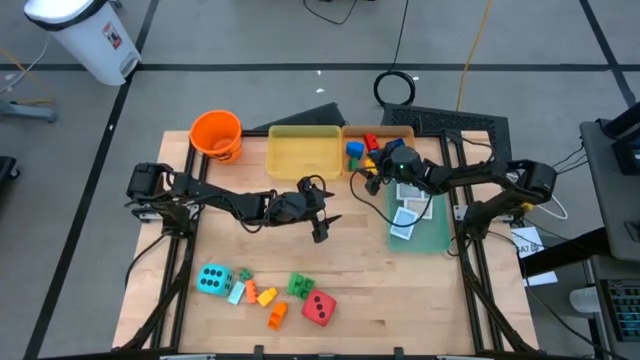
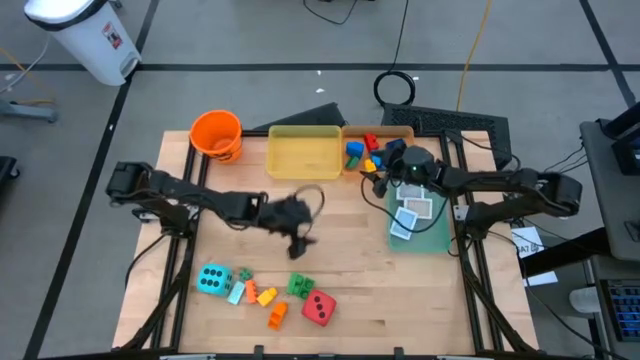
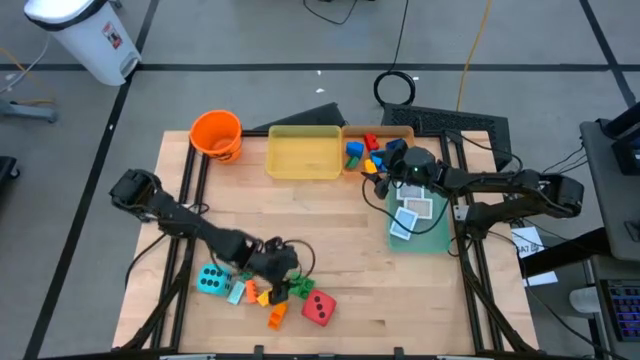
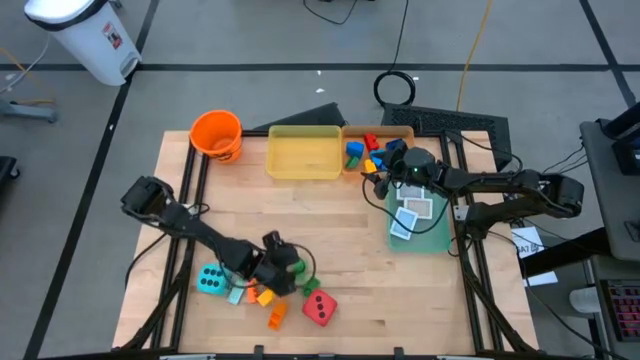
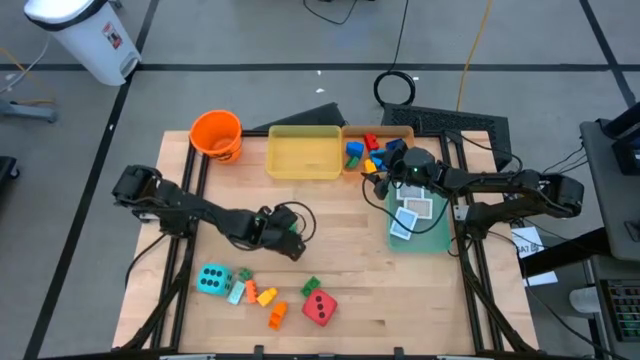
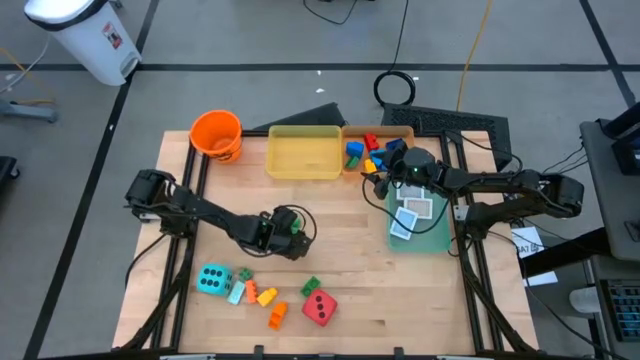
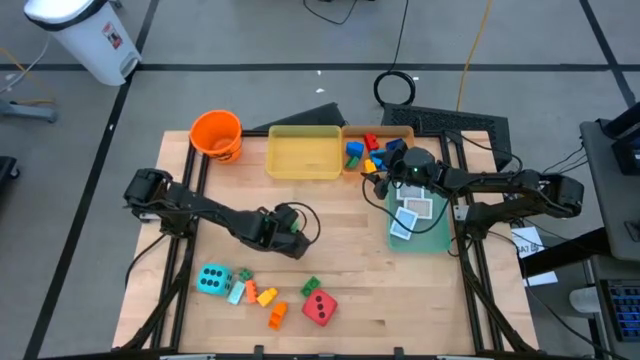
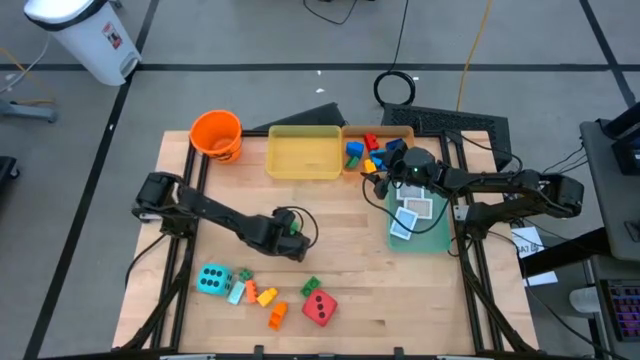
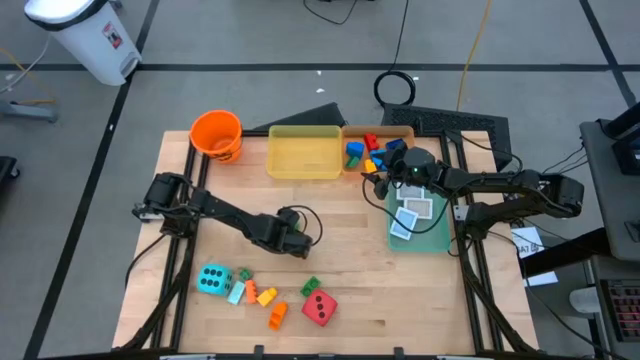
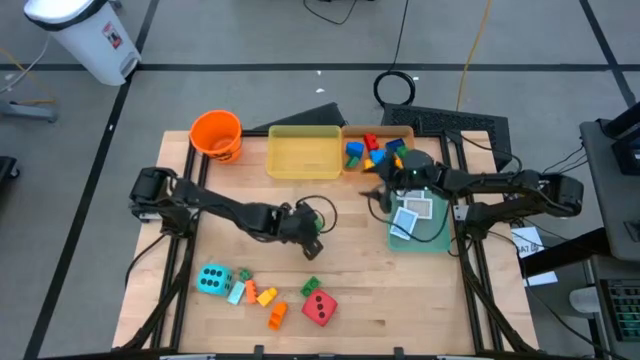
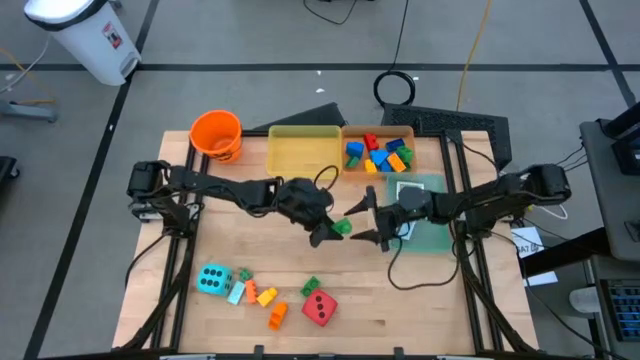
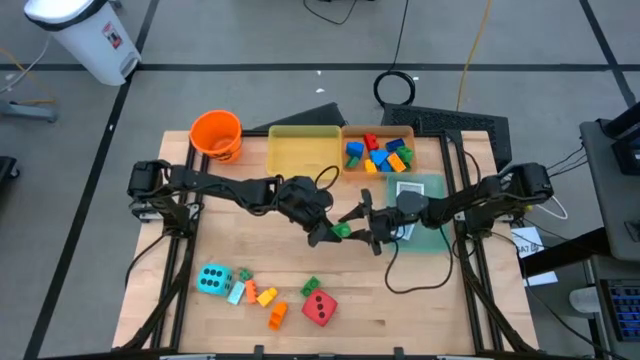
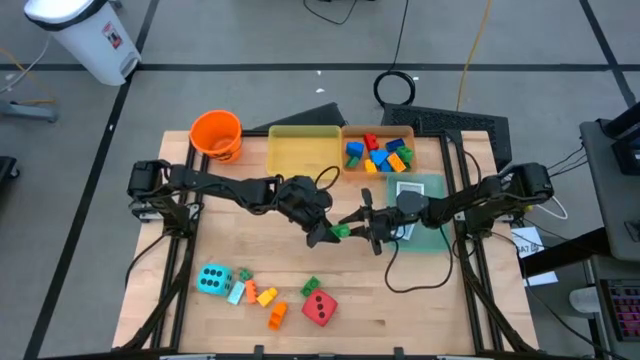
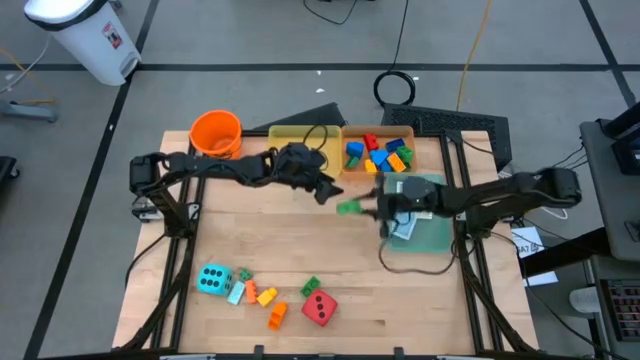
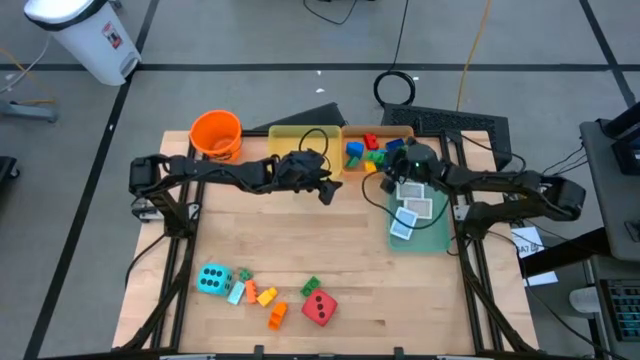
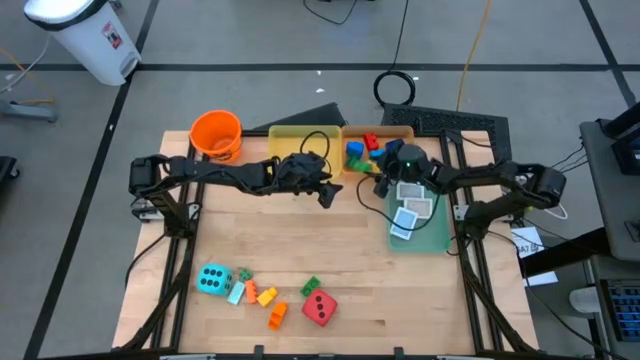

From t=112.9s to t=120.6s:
Task: Pick & Place Toys
Put the green game piece into the orange bin

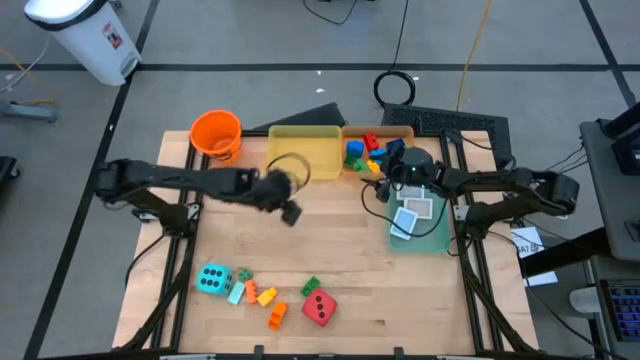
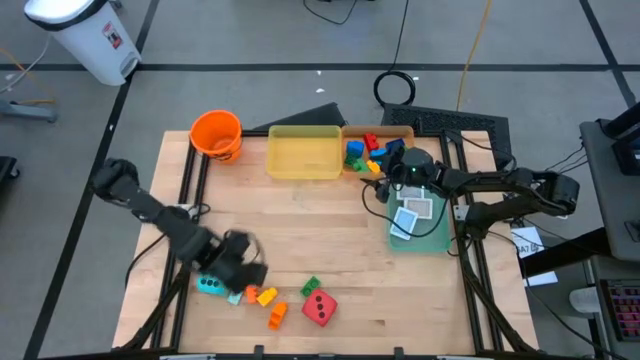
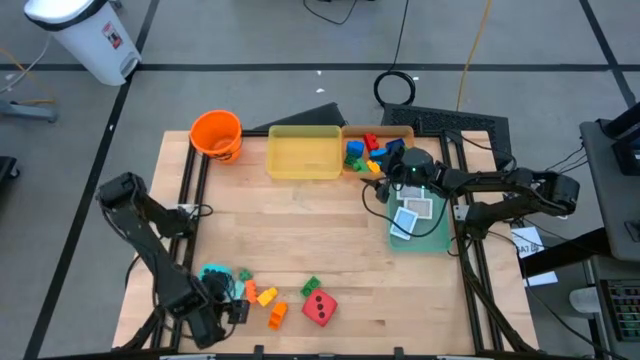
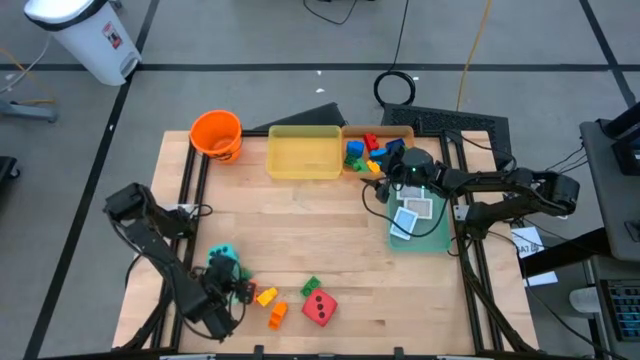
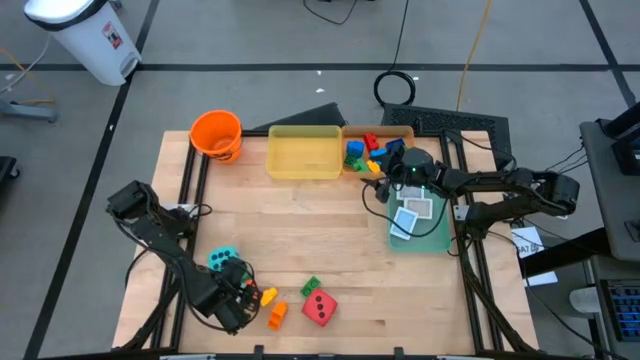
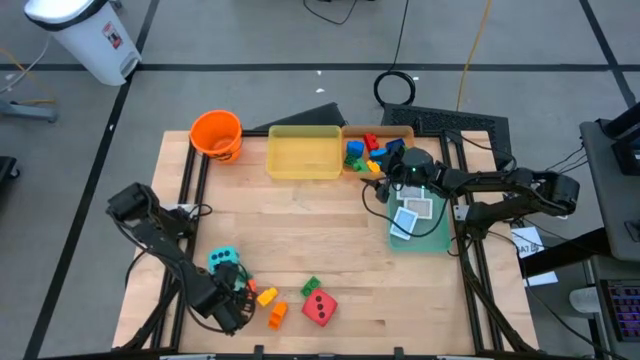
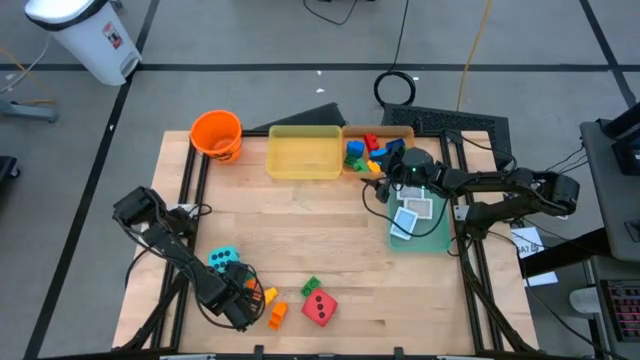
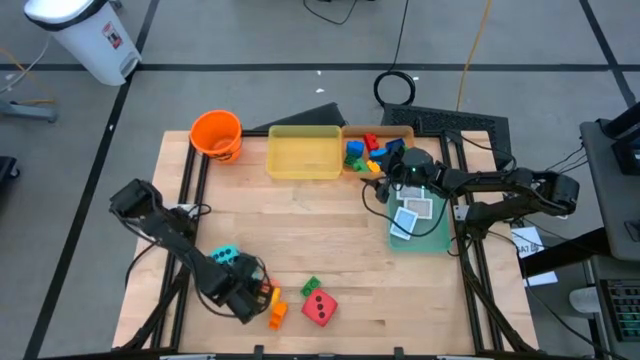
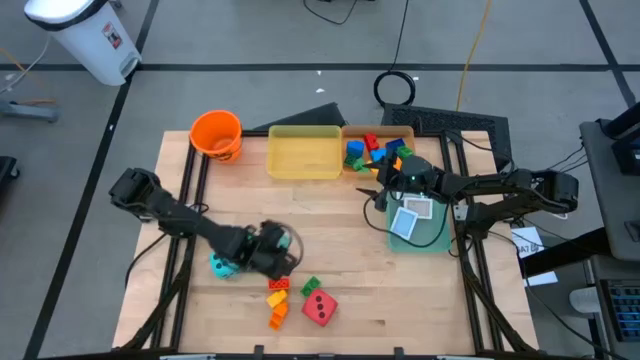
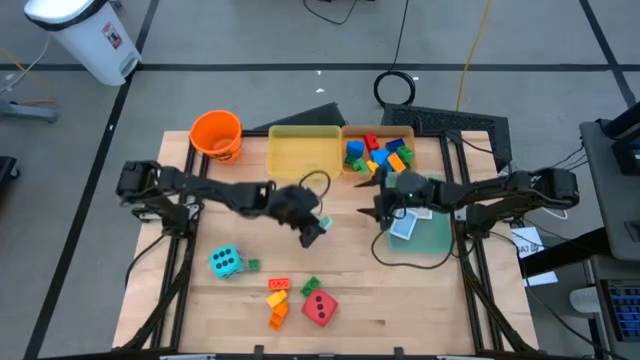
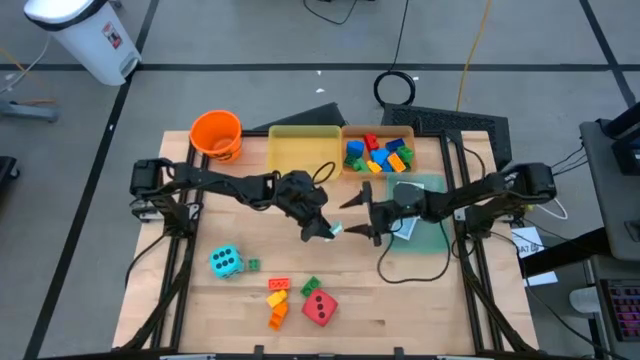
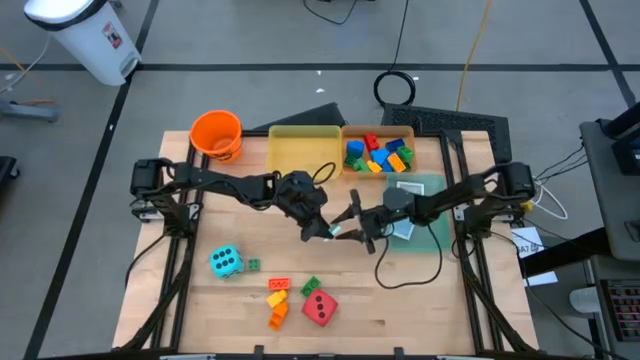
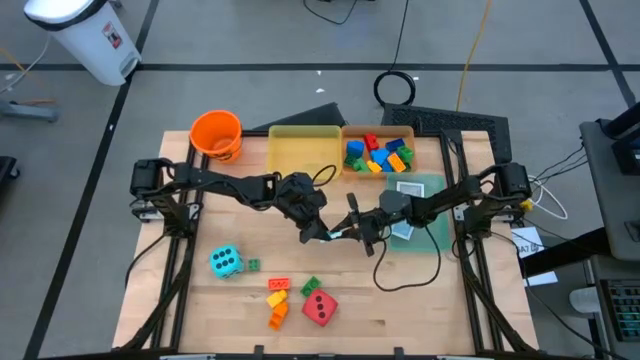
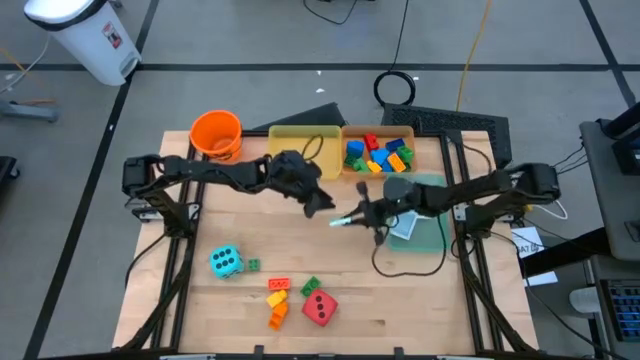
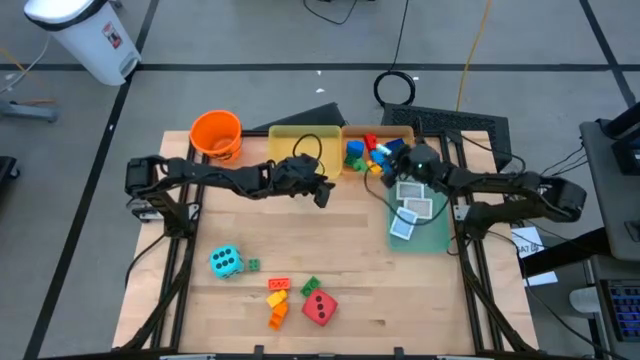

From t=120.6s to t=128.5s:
Put the light blue game piece into the orange bin

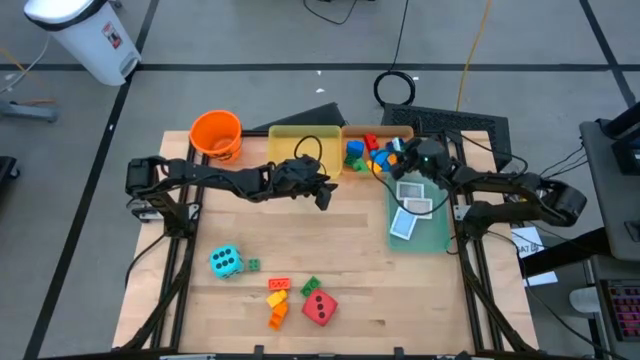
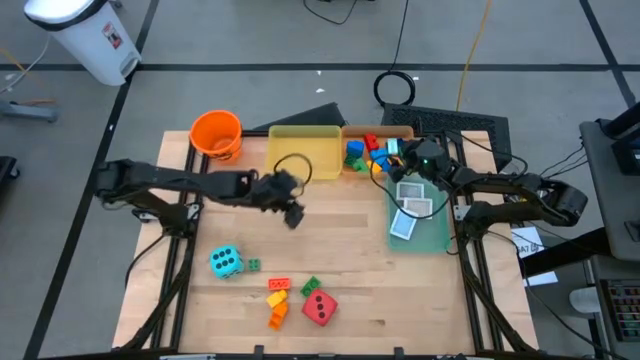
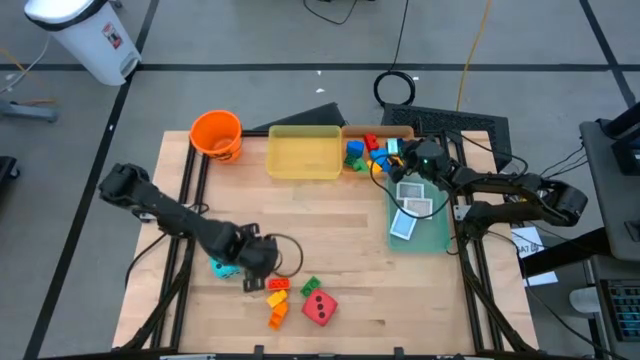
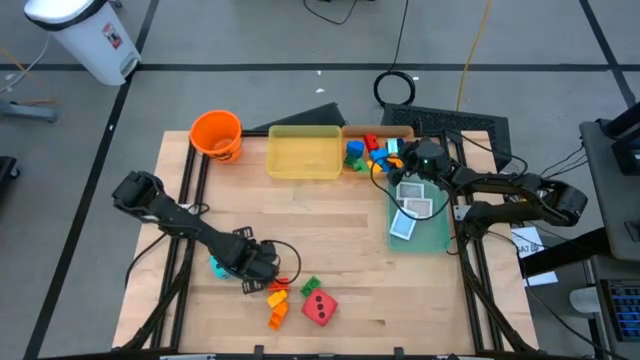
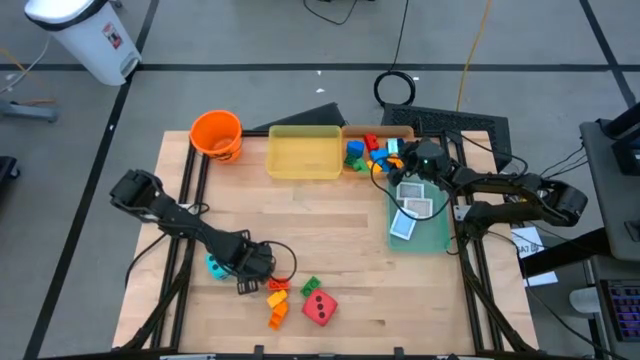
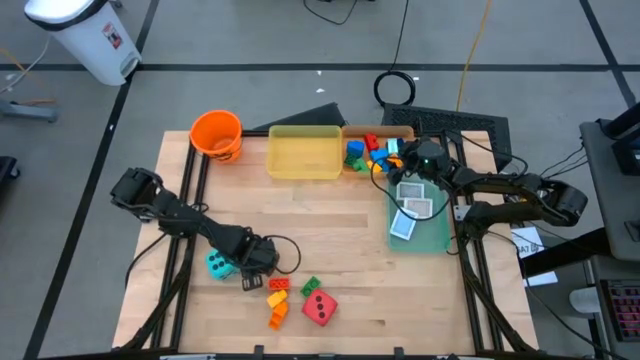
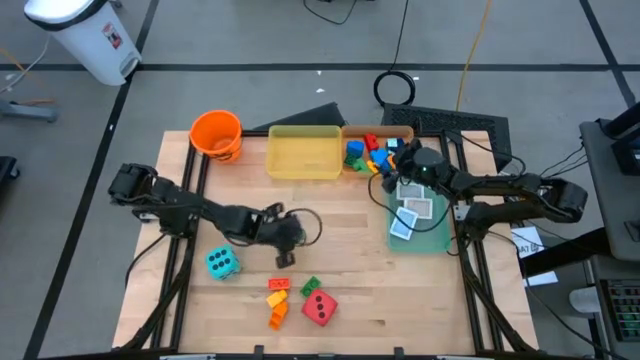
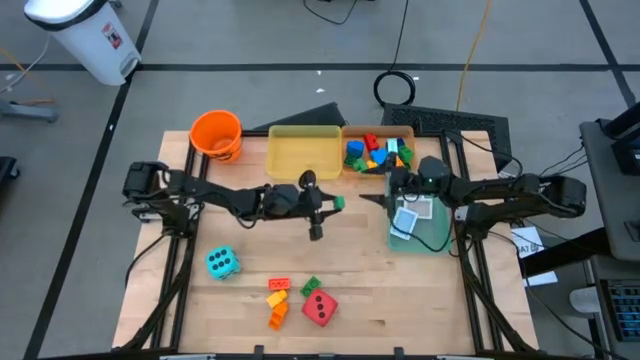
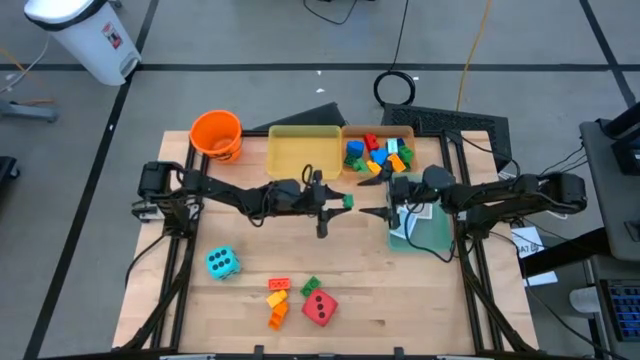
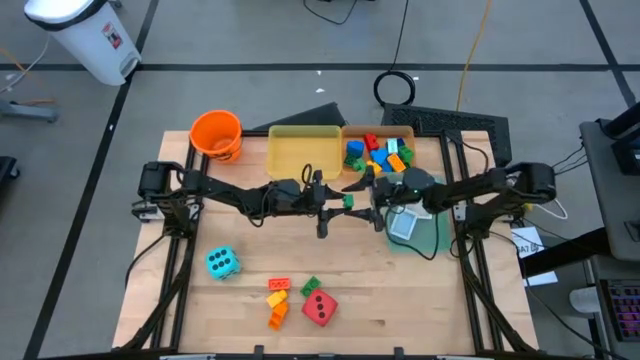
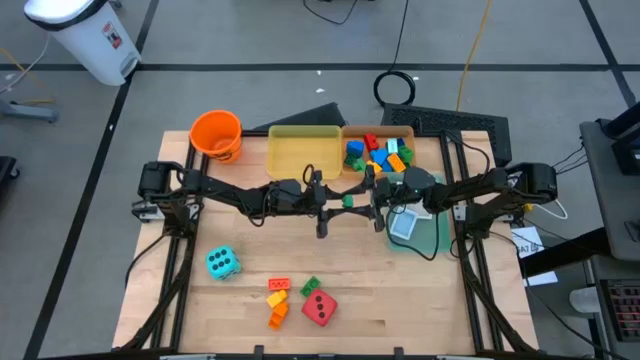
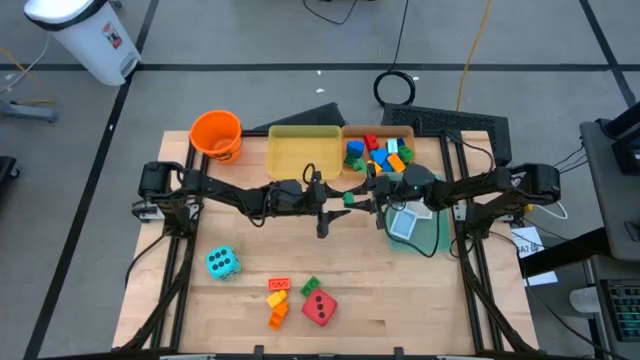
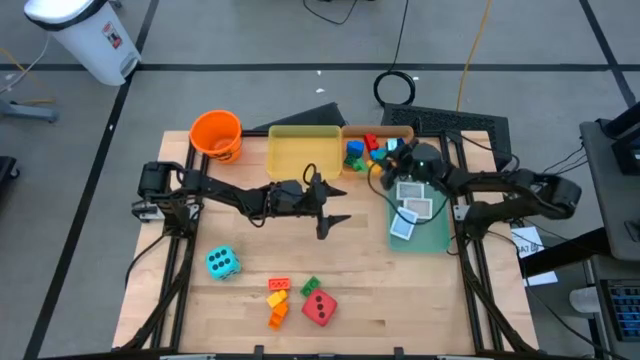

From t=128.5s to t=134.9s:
Put the green game piece into the orange bin
